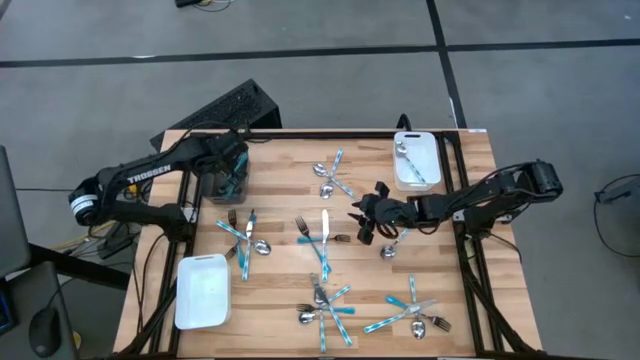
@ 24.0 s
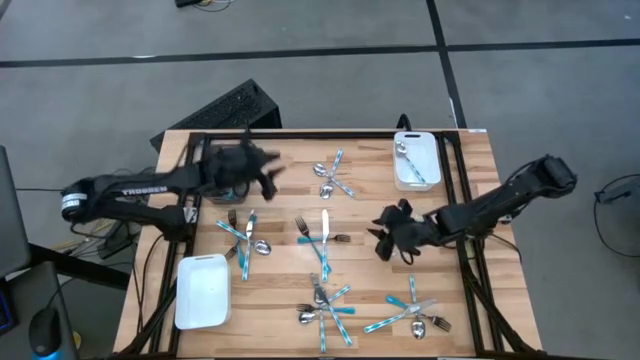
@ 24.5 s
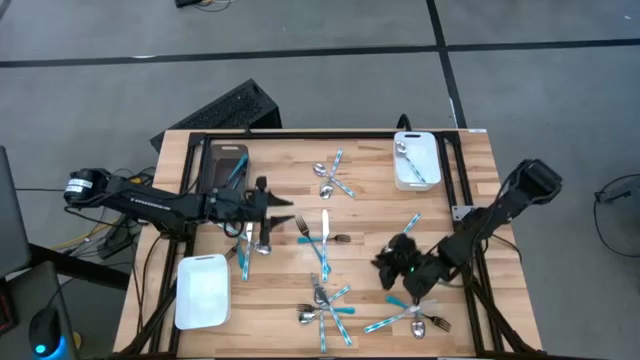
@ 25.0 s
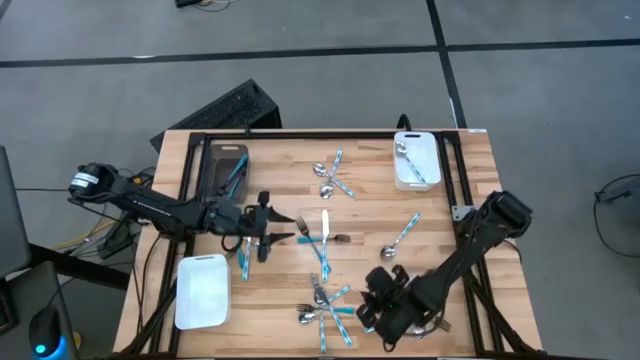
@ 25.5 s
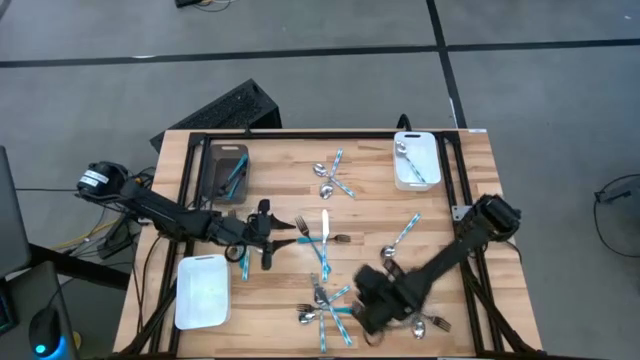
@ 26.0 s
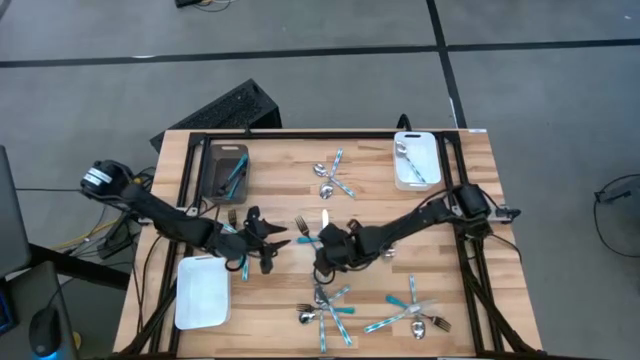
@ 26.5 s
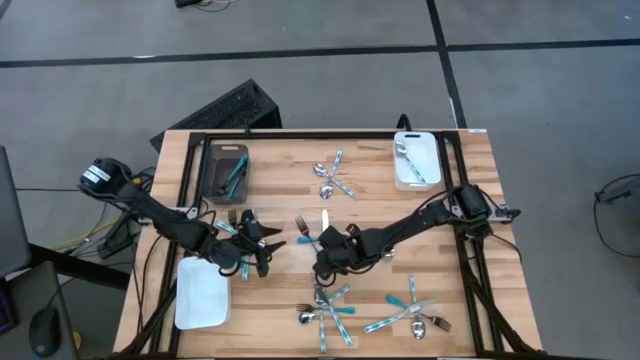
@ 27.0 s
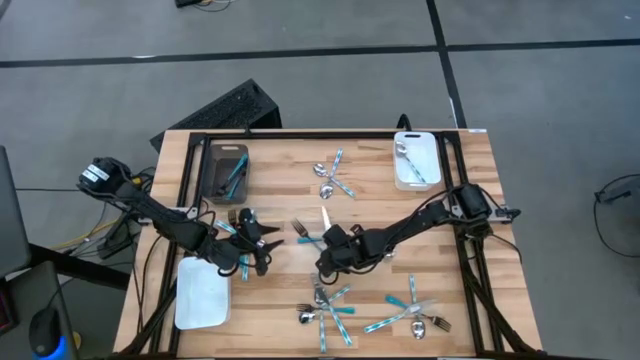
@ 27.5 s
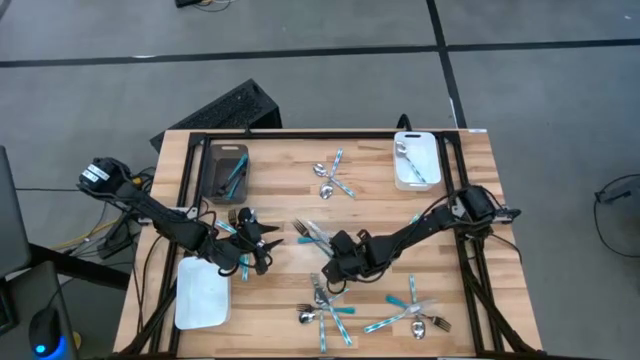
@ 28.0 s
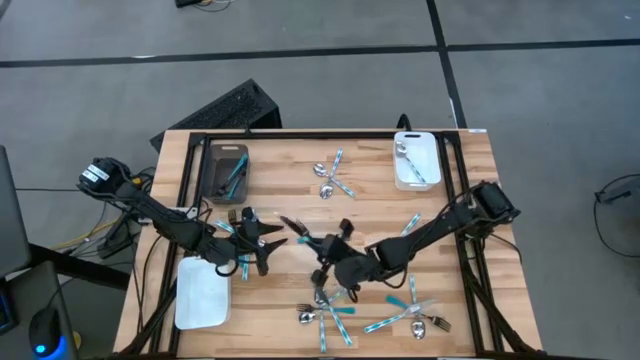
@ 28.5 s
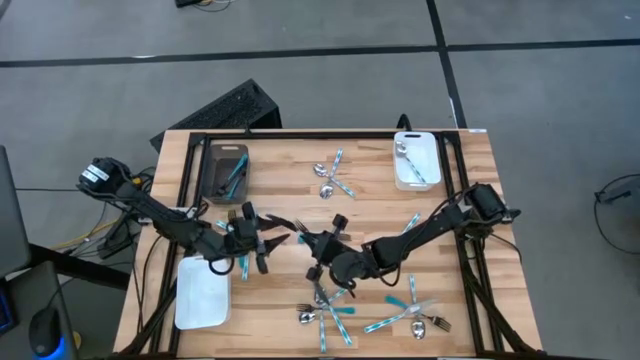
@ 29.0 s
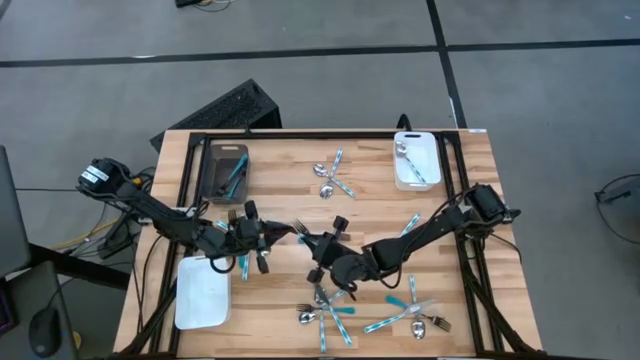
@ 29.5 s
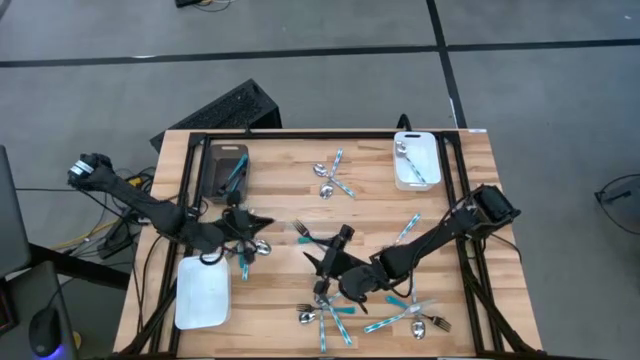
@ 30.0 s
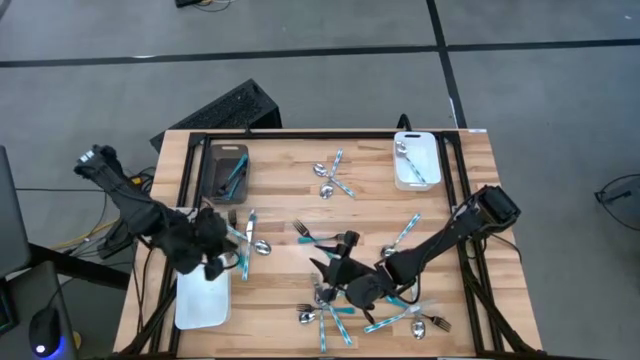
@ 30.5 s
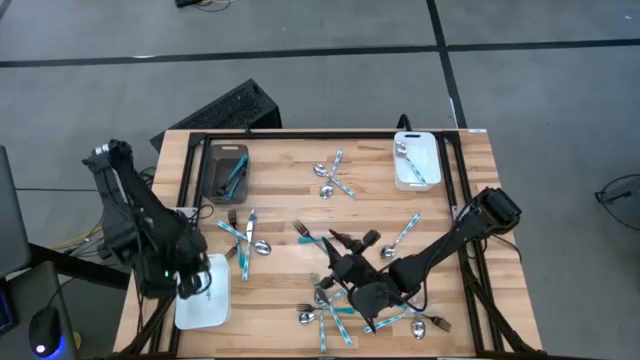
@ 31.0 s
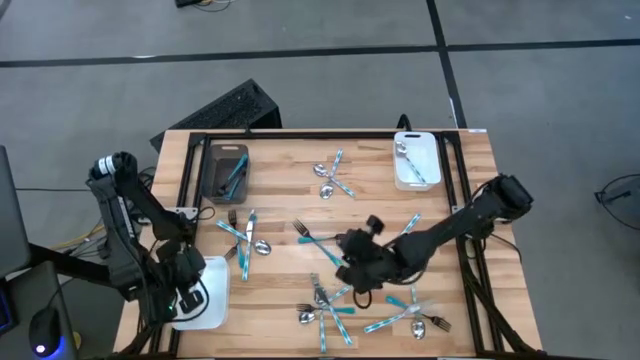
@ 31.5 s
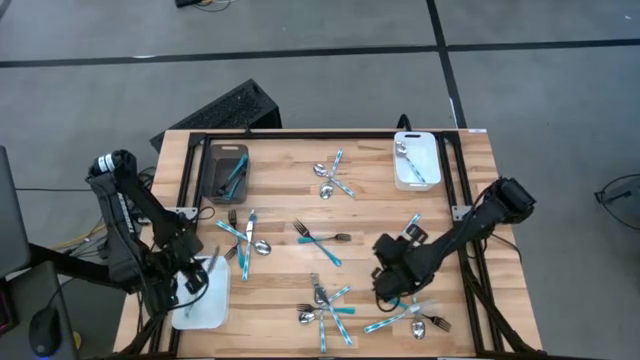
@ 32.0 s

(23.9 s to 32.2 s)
Task: Sort silverware by color (type)
Put the blue patterned knife into the bottom left white bin

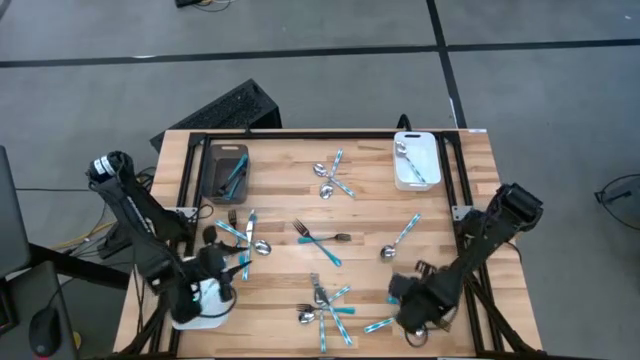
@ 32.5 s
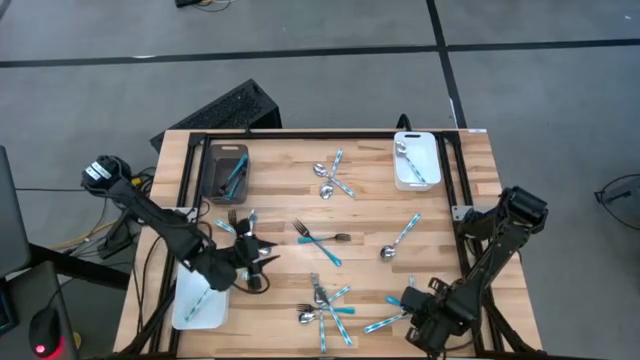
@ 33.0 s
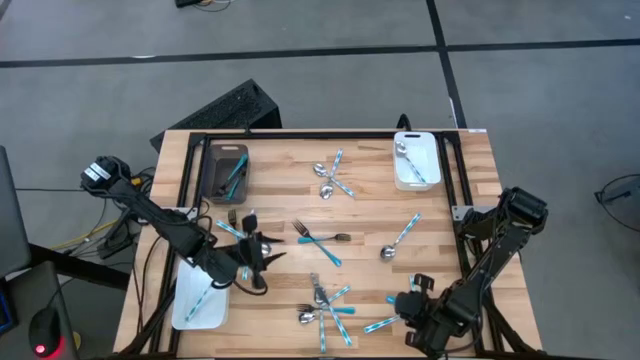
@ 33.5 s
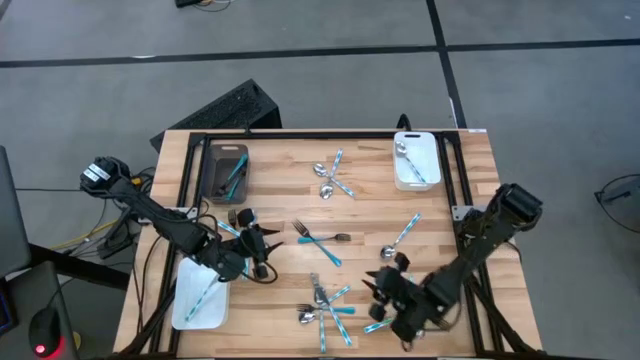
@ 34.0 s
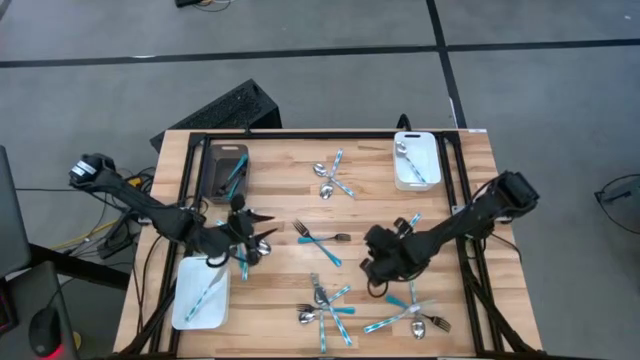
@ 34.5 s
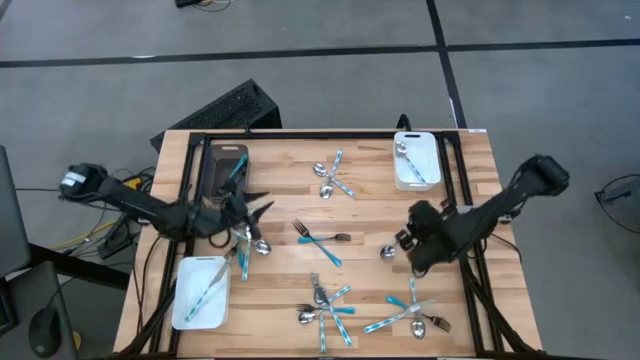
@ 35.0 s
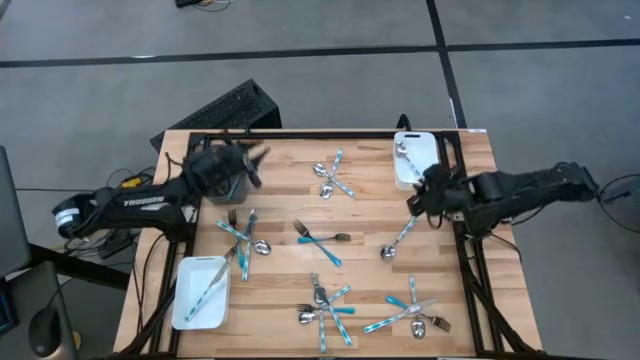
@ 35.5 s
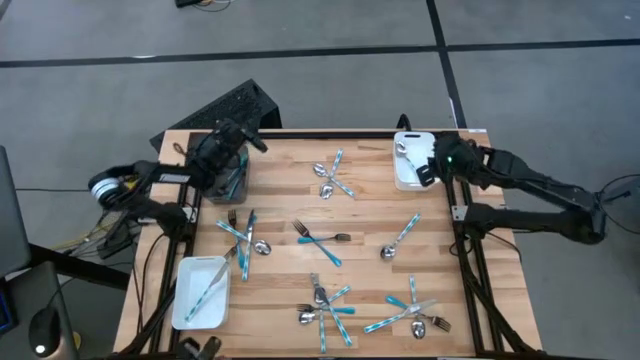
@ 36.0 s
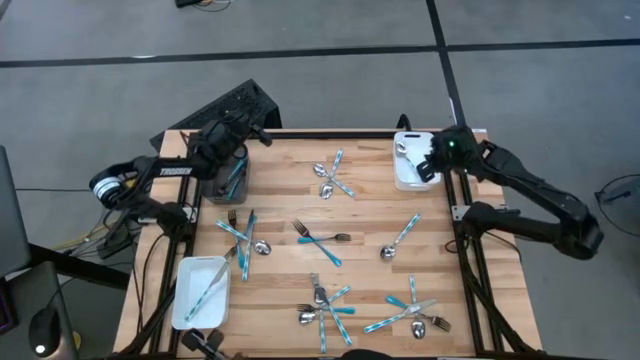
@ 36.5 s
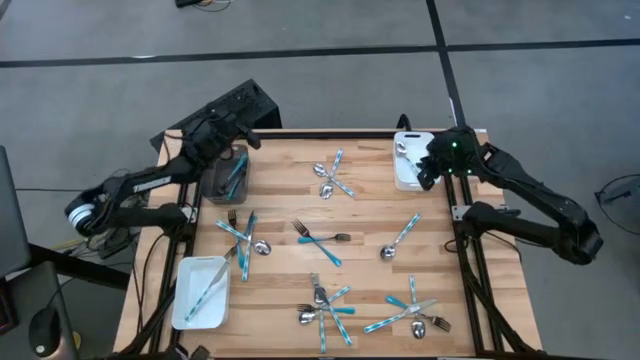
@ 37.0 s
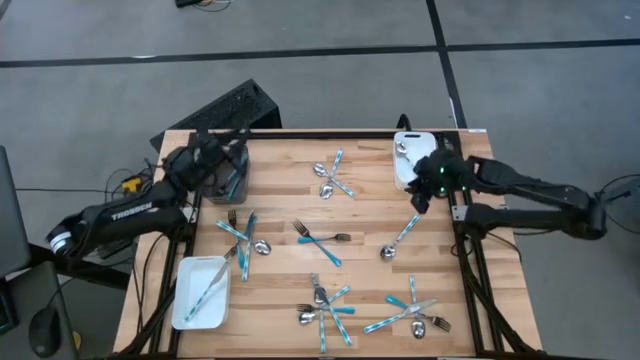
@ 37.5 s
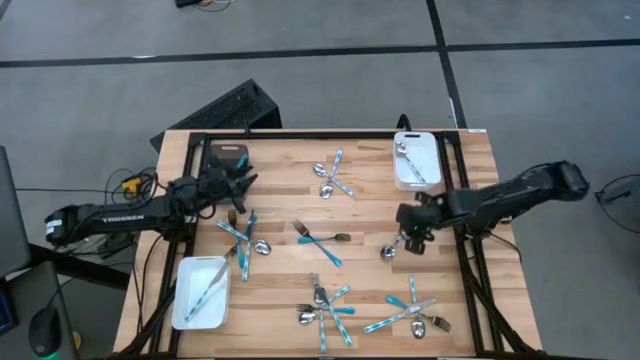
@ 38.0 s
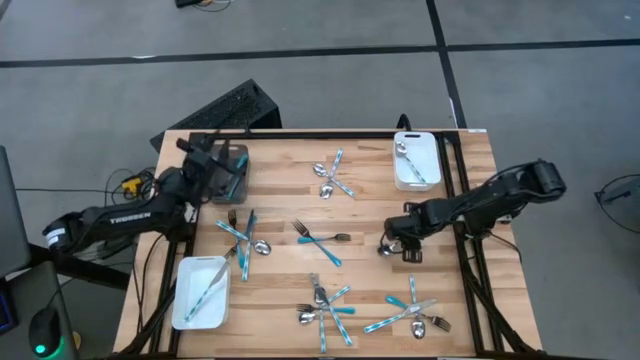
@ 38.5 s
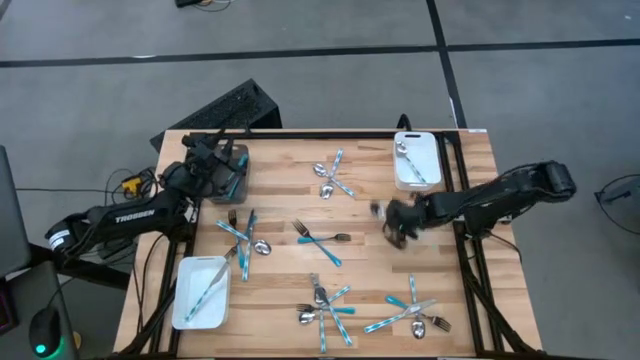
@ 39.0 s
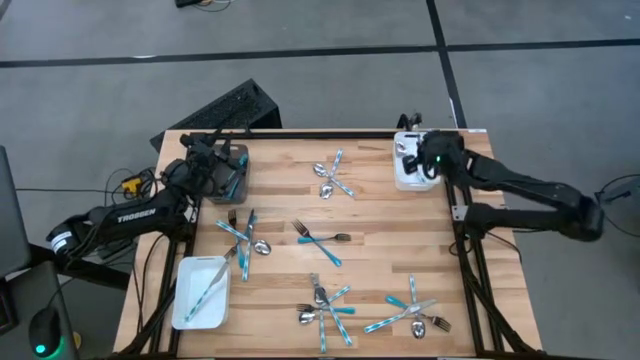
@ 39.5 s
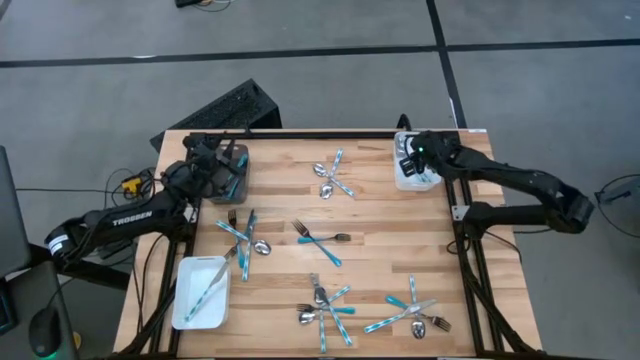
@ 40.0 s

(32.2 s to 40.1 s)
Put the blue patterned spoon into the top right white bin

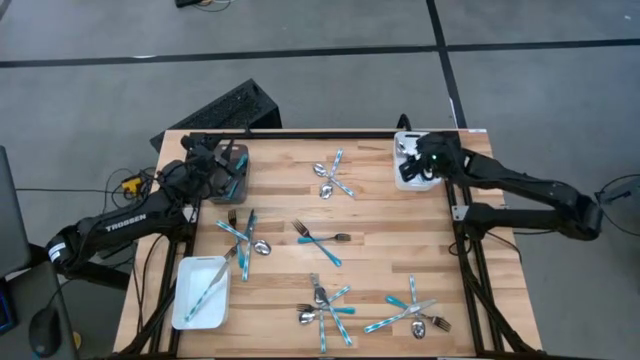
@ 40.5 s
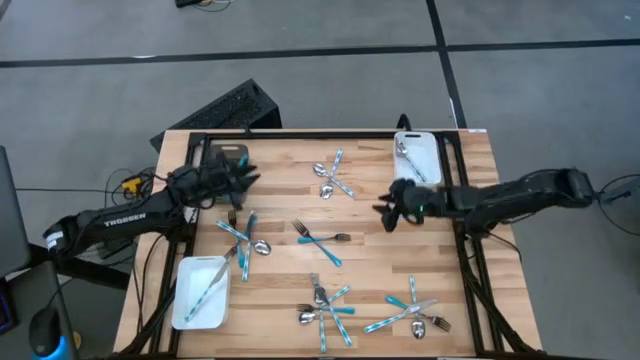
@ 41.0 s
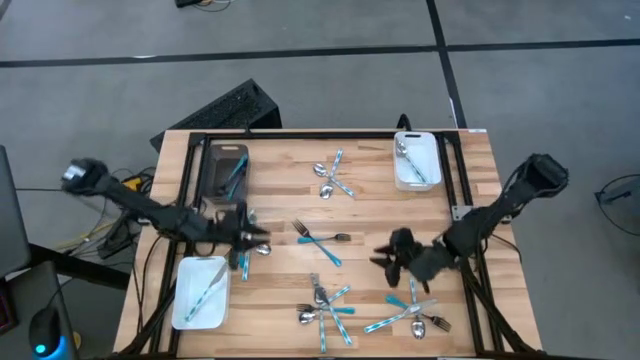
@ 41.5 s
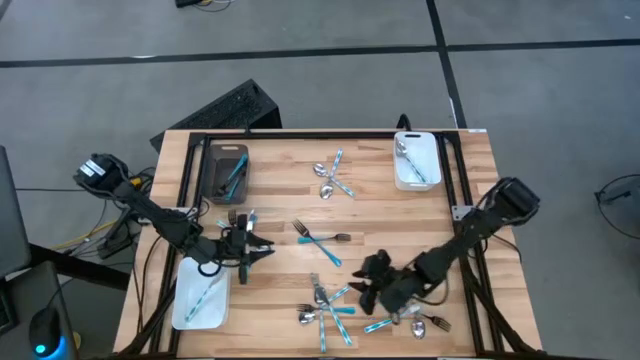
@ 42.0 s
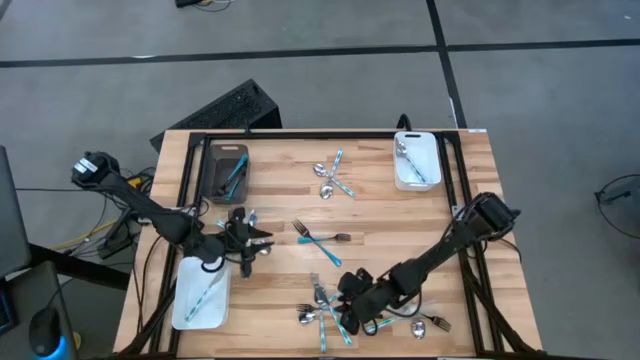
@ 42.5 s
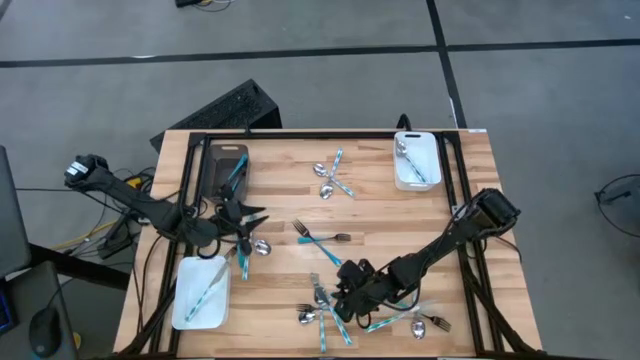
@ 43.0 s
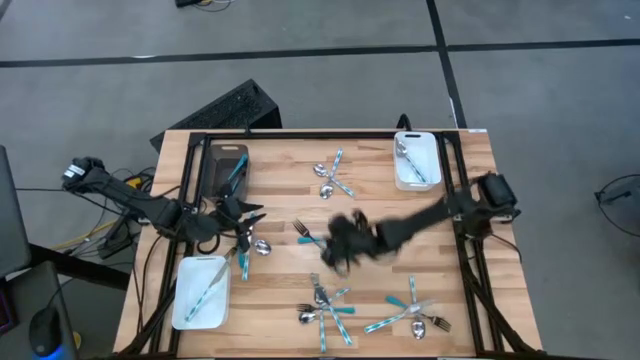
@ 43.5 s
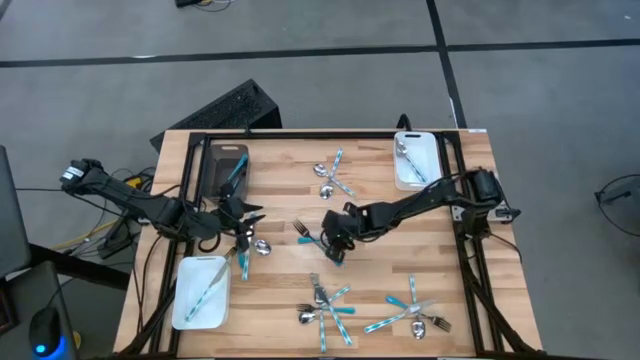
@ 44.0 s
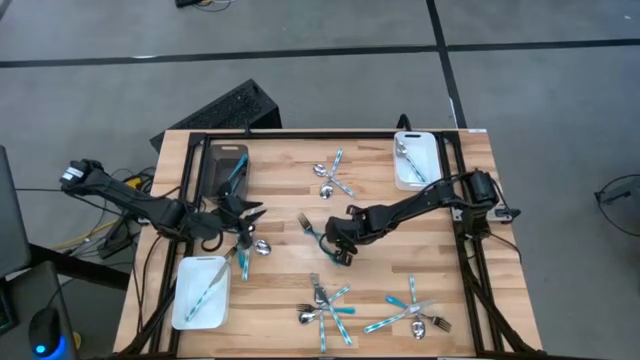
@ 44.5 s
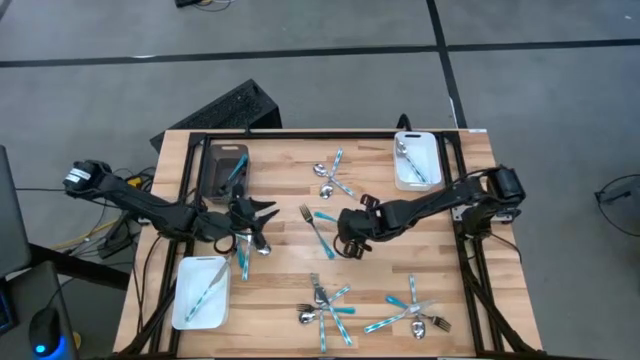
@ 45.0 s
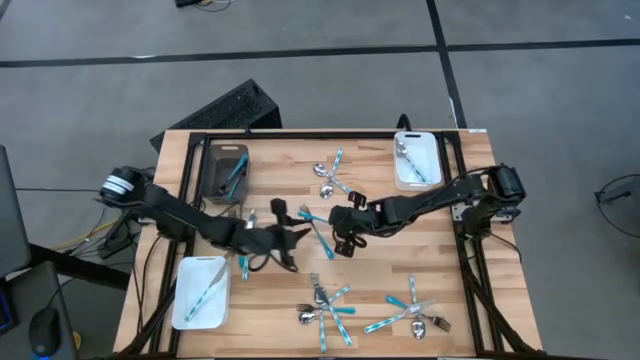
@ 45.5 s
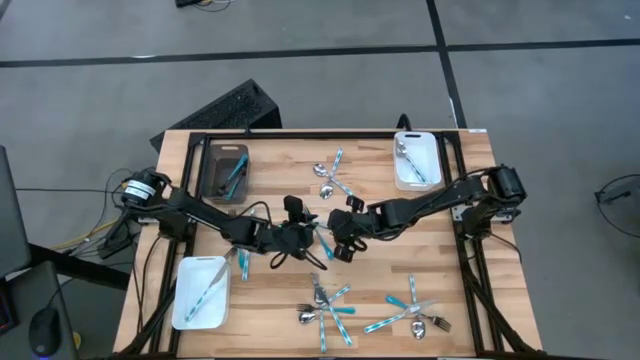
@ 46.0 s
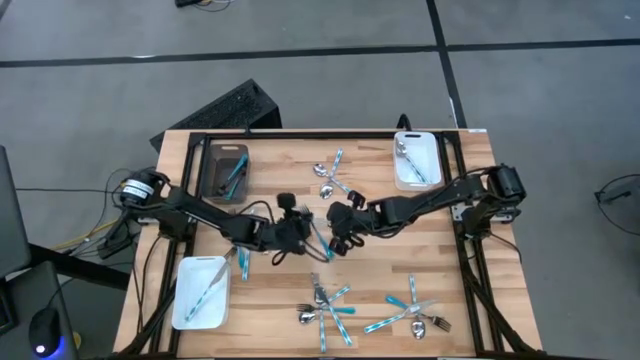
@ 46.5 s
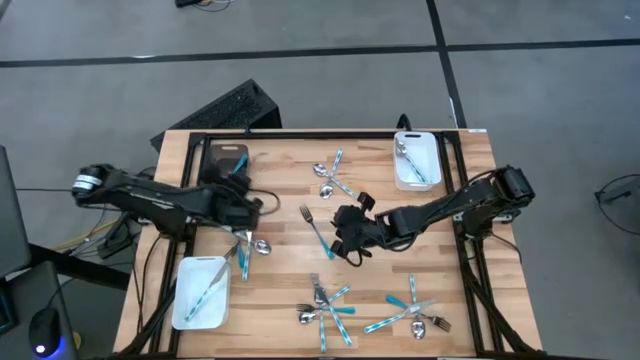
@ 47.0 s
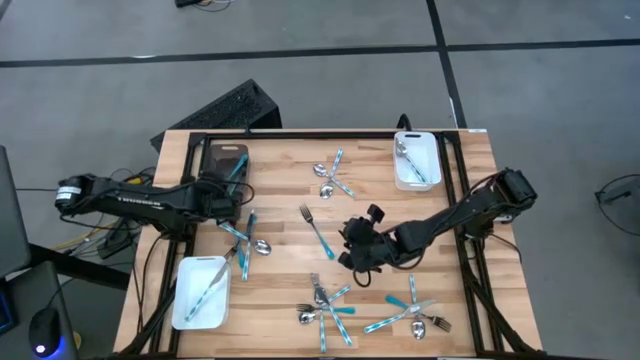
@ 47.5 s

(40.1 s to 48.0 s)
Put the blue fork into the black bin
